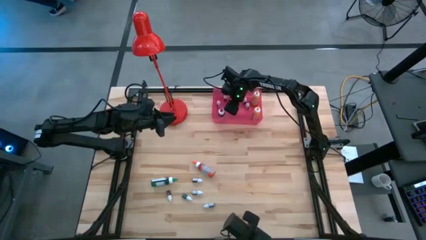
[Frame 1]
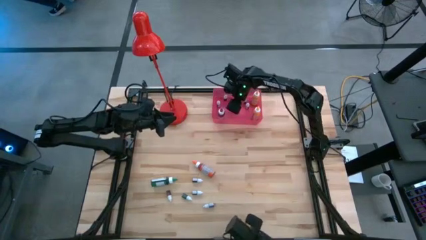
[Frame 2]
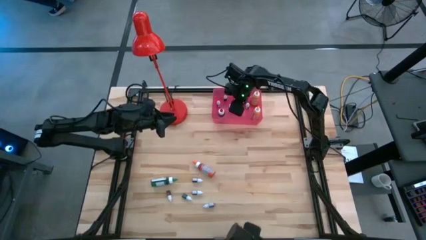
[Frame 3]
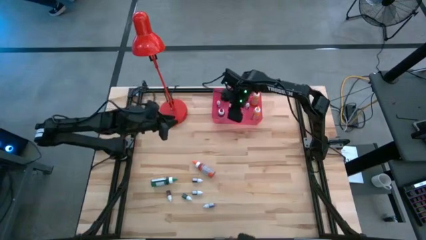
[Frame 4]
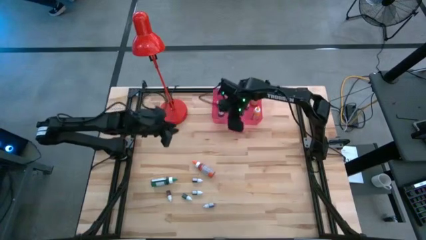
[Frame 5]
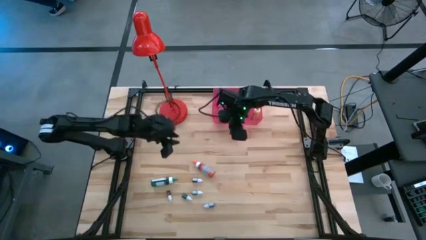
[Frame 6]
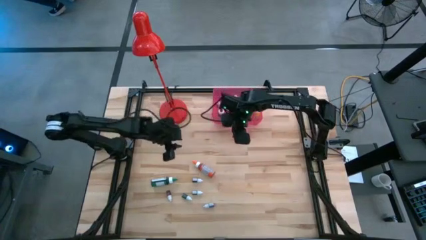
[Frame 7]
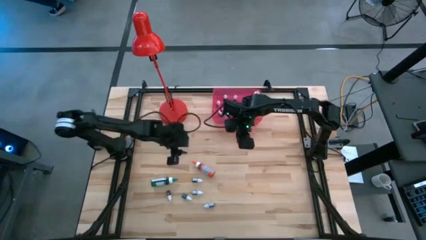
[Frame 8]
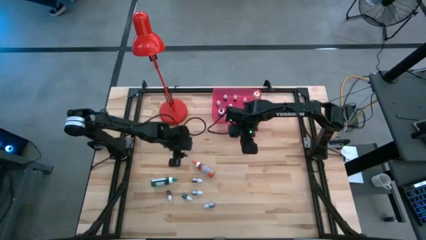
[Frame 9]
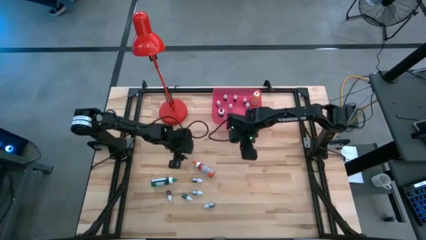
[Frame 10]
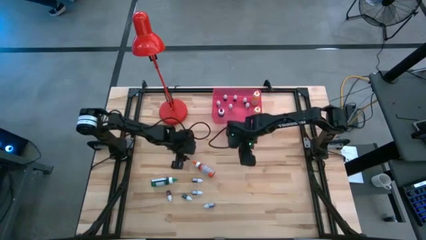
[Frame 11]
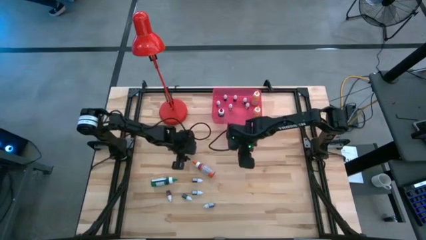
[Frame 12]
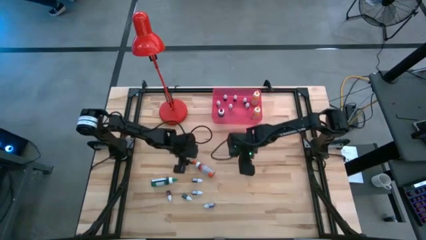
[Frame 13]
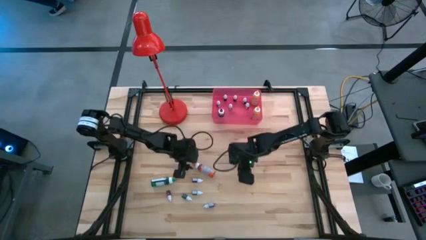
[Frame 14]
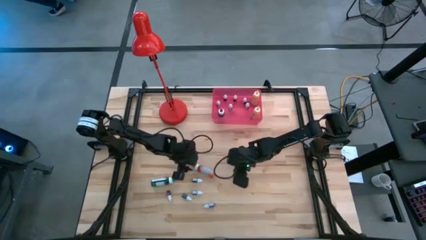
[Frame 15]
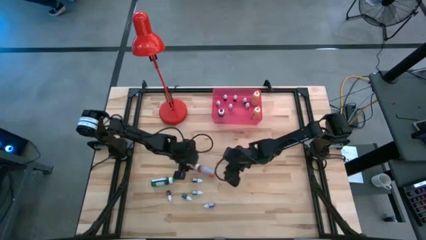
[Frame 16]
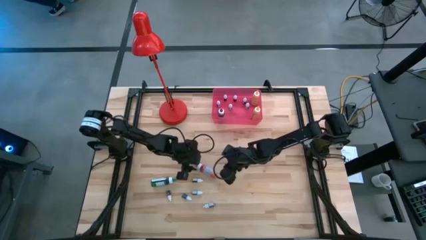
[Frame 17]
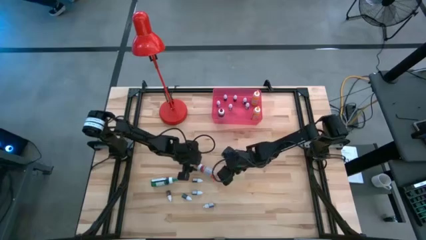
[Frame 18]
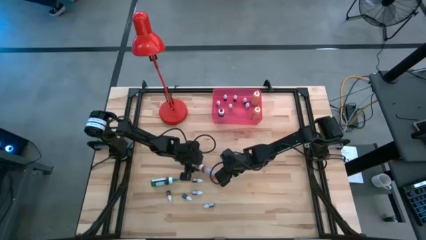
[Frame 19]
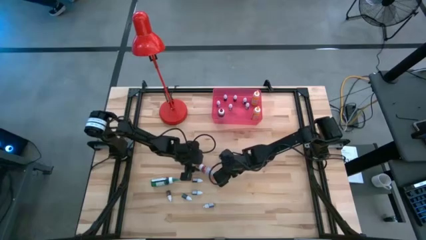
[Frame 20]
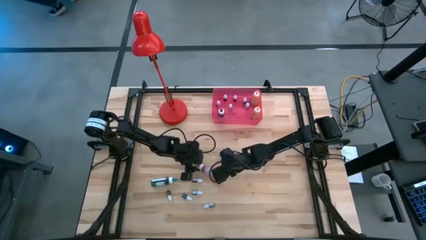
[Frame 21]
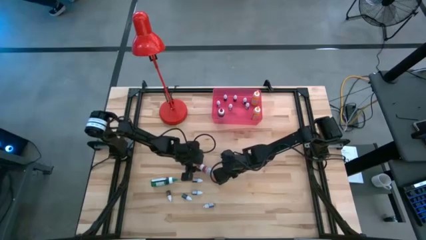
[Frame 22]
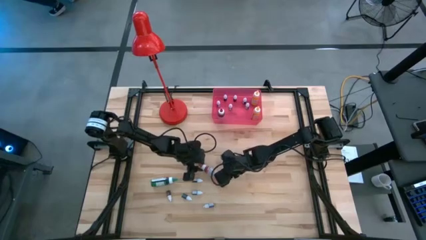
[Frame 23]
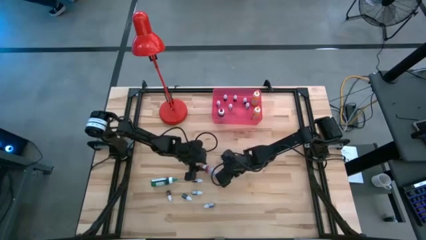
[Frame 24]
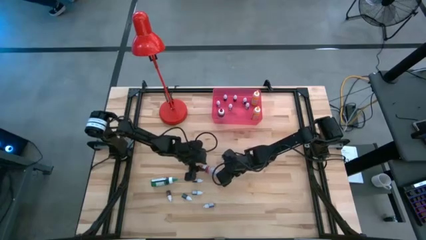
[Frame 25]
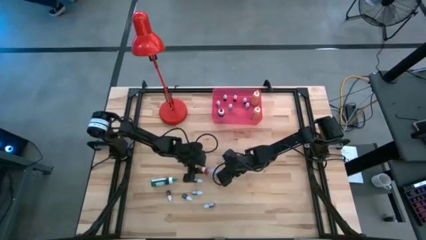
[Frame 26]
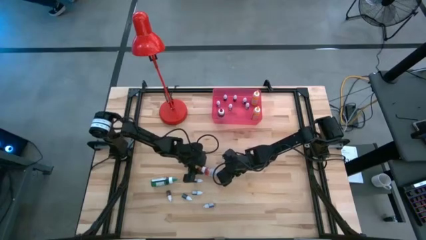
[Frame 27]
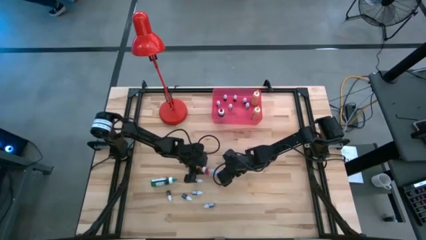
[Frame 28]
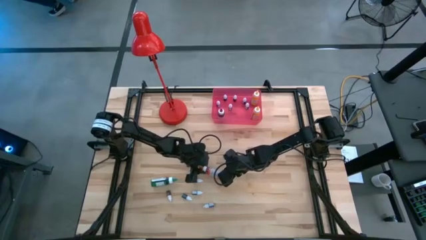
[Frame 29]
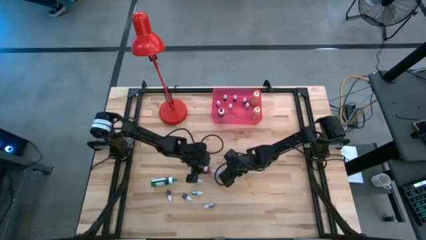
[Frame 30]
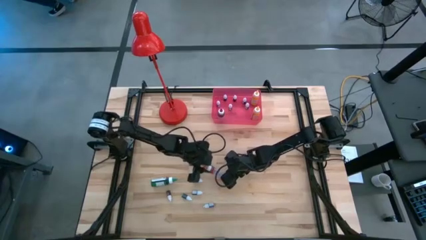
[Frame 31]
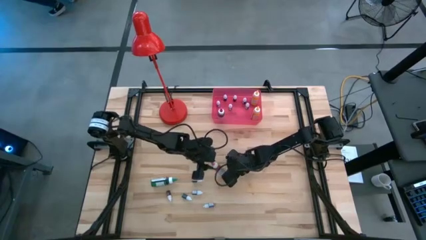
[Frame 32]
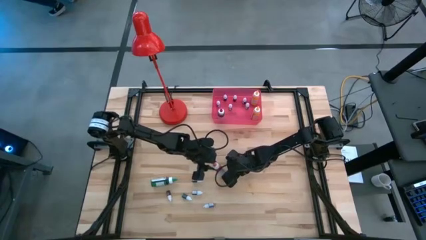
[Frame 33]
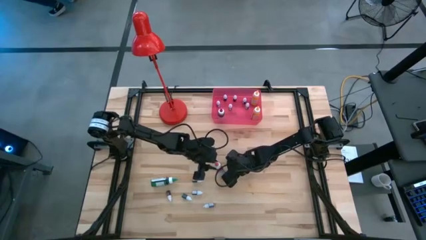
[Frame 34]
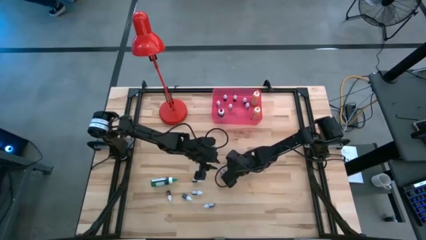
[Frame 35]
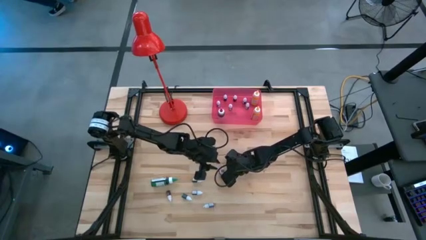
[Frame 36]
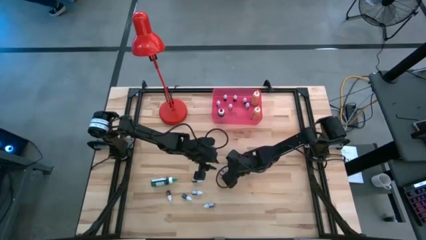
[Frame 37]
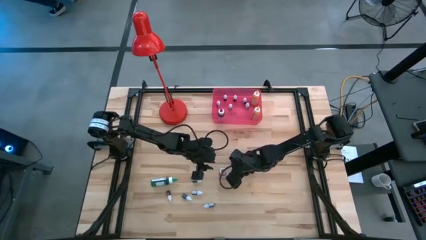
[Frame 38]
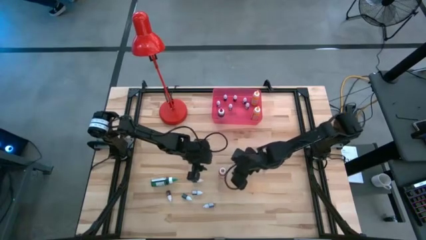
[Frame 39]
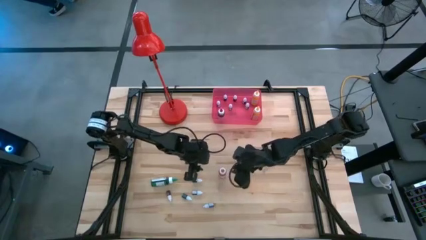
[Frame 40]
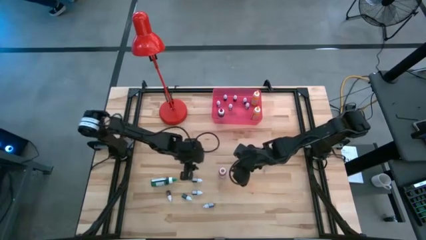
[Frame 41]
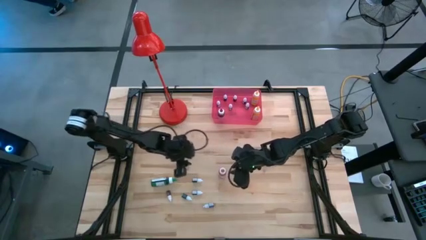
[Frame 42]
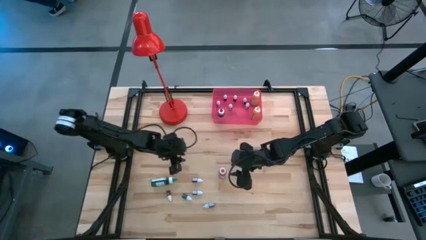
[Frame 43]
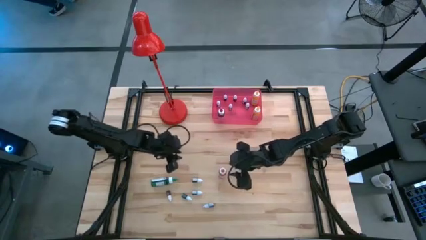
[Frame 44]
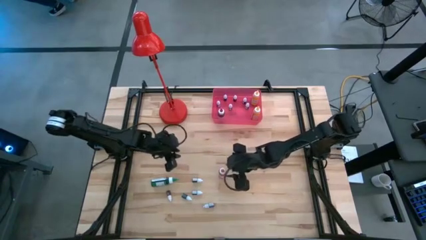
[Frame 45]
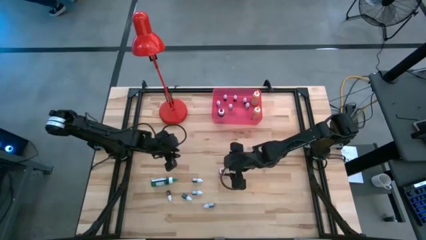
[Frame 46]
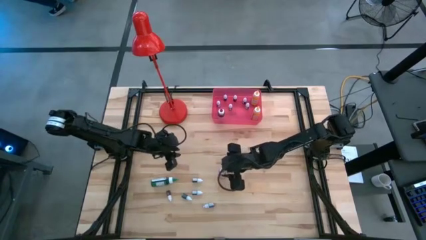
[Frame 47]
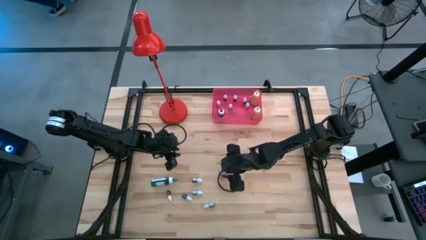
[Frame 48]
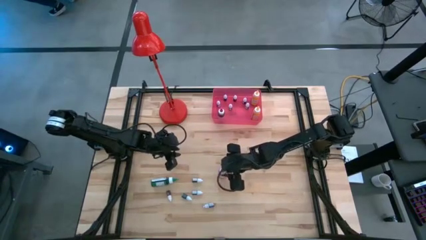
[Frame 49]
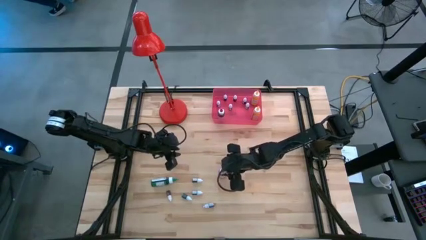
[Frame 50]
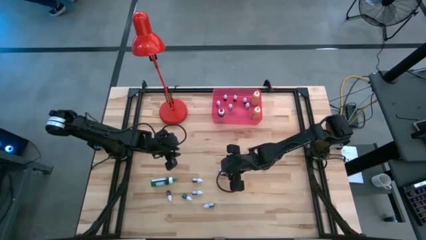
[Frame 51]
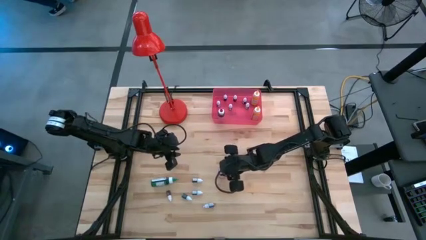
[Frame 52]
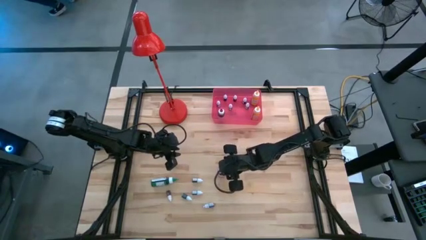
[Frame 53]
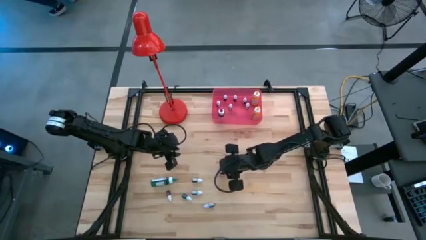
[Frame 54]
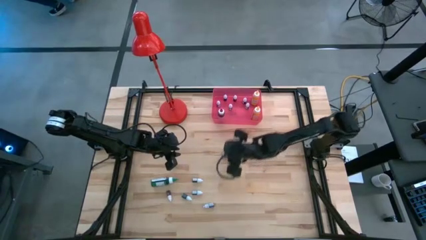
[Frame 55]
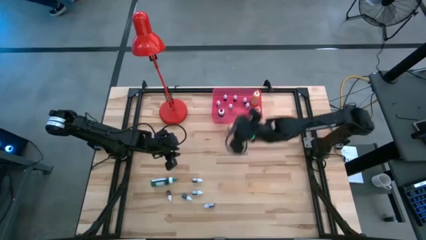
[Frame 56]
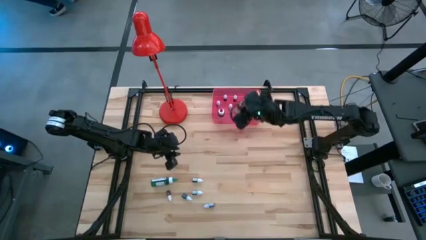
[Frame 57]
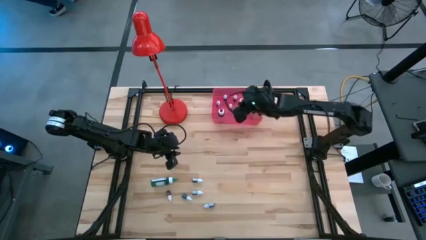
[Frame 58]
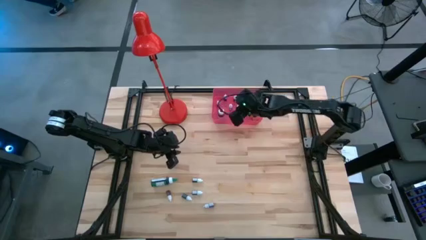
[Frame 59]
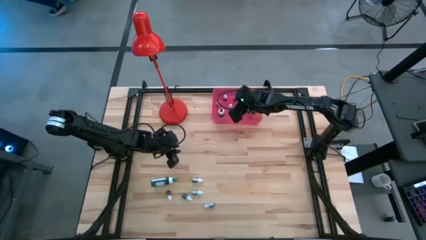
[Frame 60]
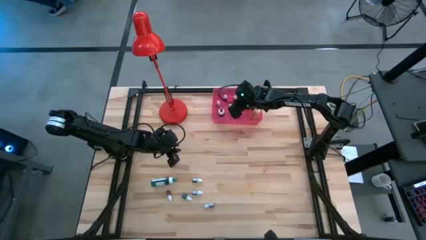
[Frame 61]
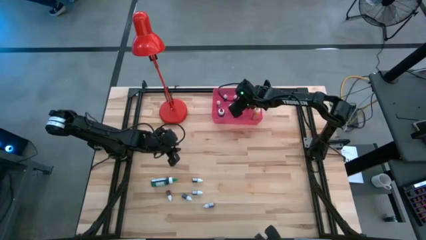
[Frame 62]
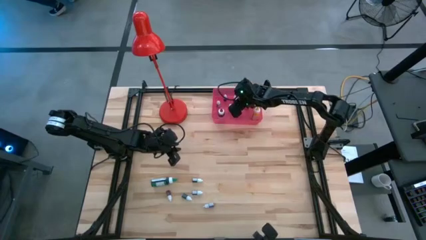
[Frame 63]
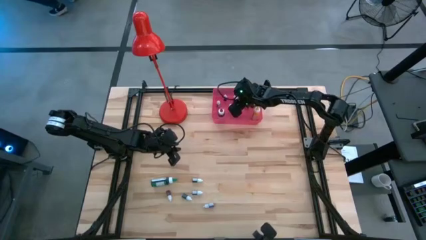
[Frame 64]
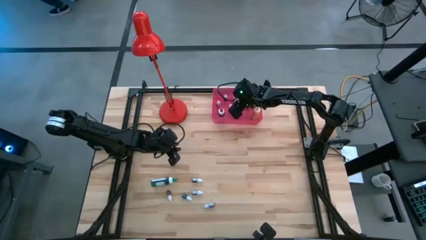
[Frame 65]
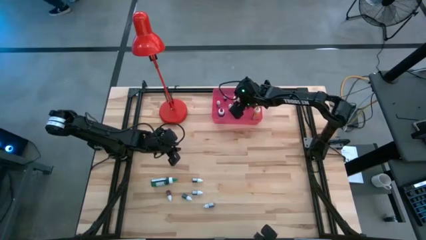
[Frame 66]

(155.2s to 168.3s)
Task: Pick & Place food coloring
Put the large orange food coloring bottle into the red bin

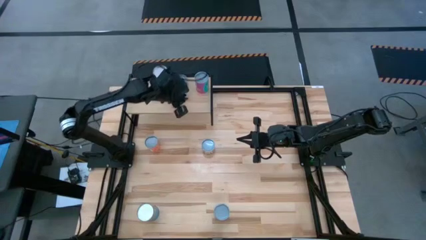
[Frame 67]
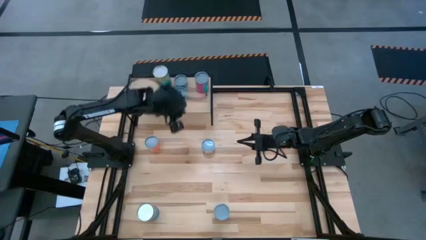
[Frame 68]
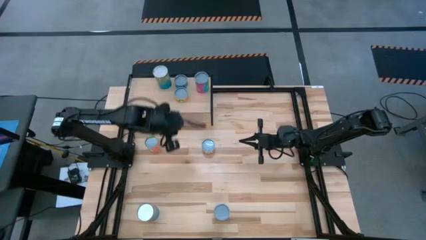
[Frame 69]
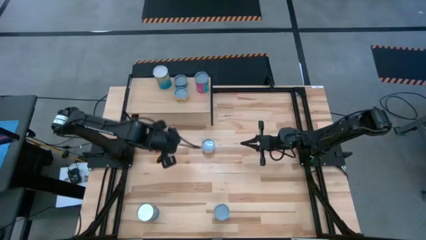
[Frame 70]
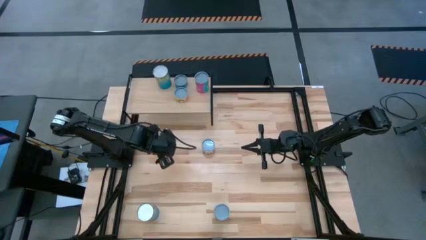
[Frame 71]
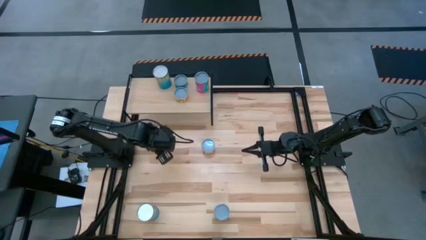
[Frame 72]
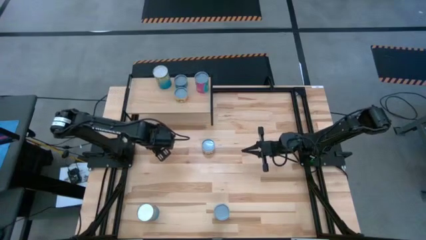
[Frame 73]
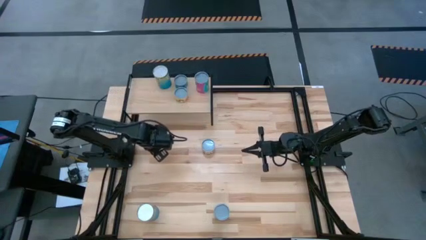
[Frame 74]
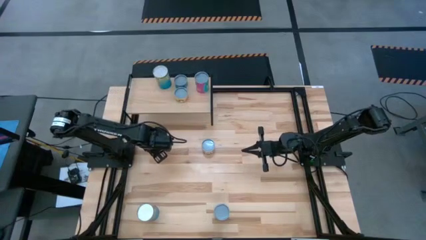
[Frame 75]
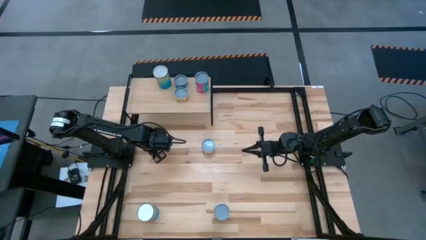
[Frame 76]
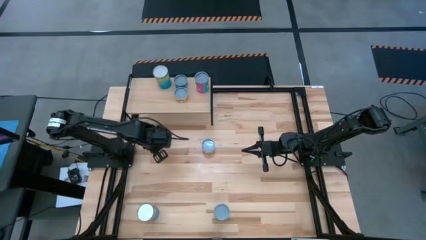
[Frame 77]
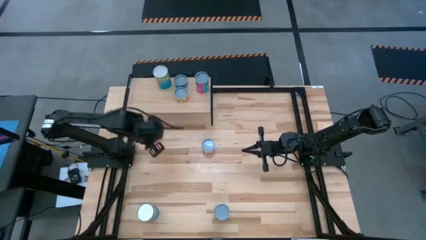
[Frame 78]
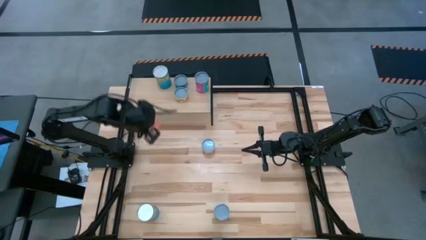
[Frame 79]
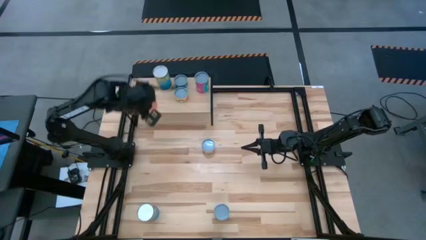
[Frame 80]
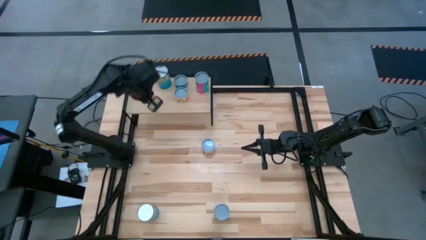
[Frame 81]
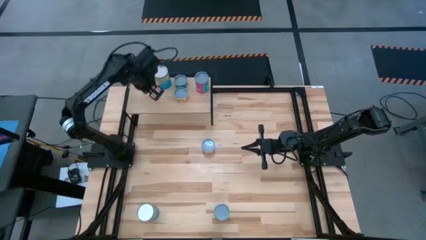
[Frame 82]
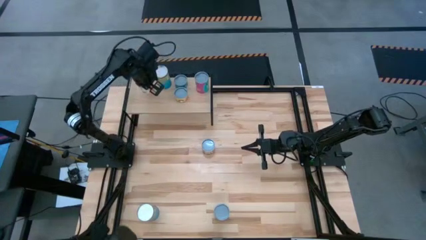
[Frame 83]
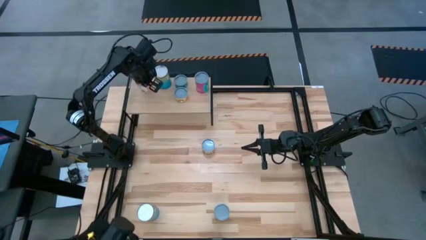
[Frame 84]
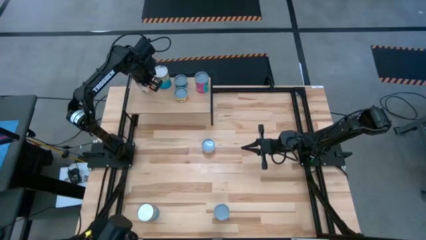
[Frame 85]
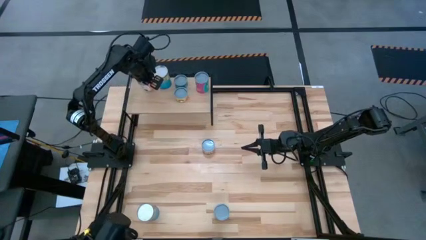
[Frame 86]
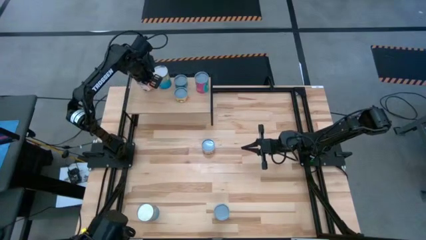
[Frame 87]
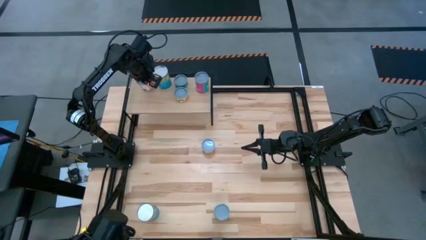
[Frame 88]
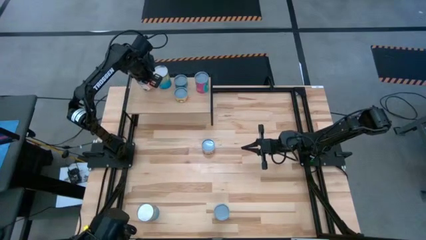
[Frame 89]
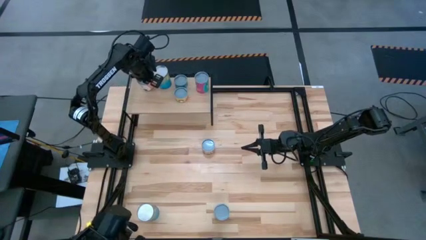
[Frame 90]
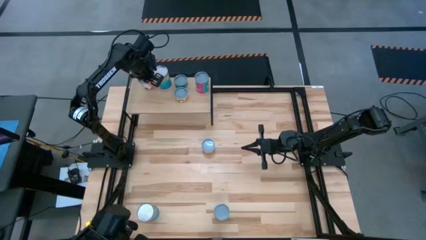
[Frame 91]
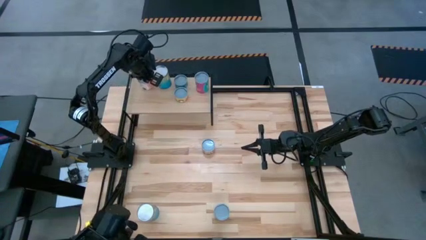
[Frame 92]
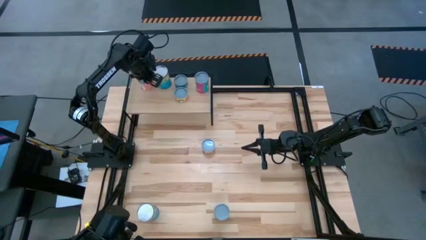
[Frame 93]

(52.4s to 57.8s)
Task: Pick and place cans onto a shelf
Put the canned tomatoes on the shelf
